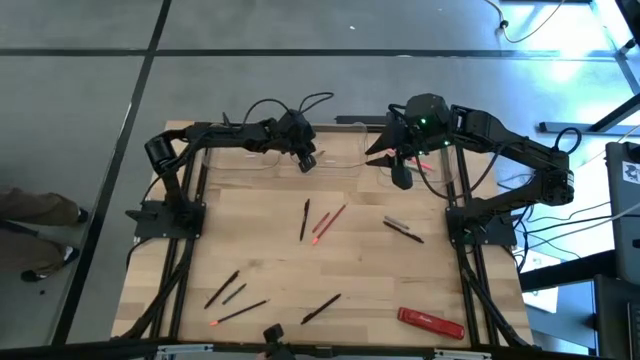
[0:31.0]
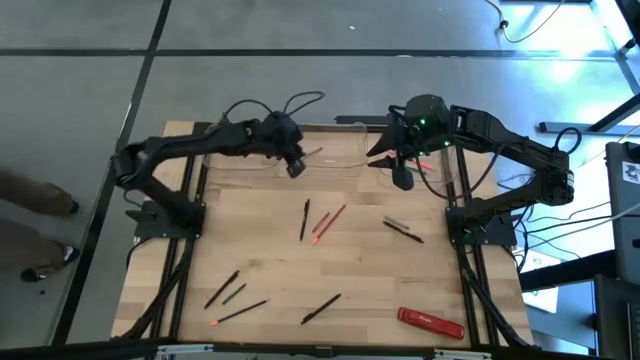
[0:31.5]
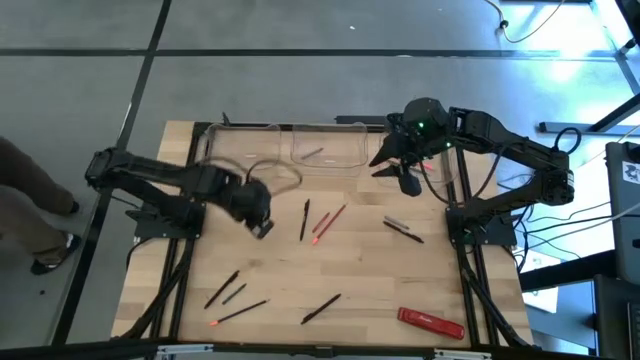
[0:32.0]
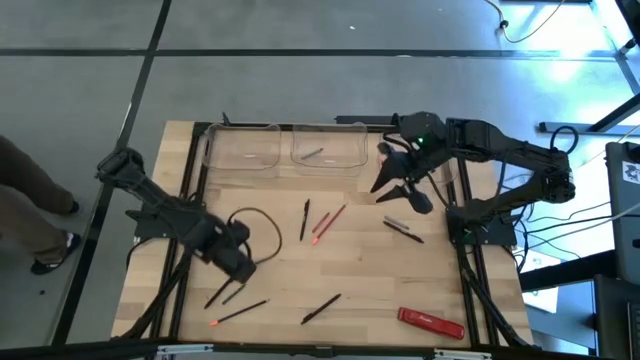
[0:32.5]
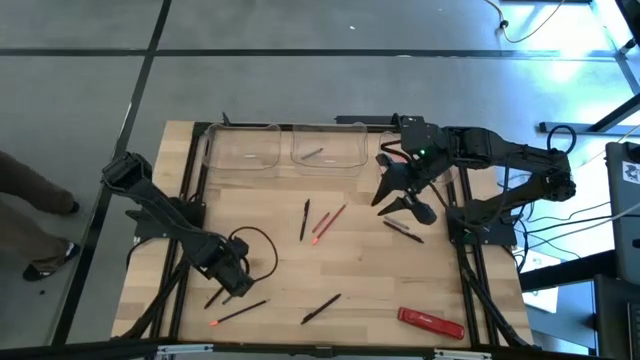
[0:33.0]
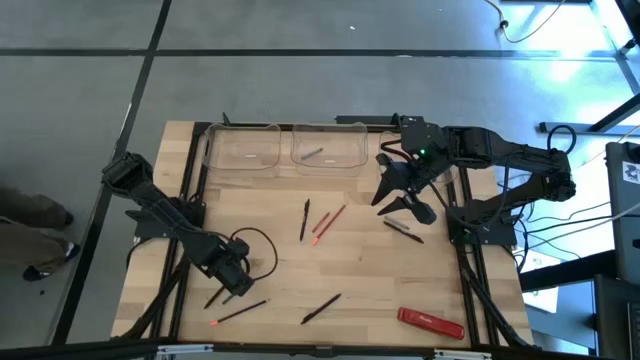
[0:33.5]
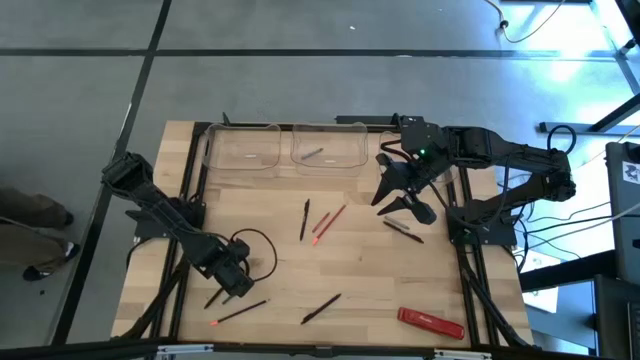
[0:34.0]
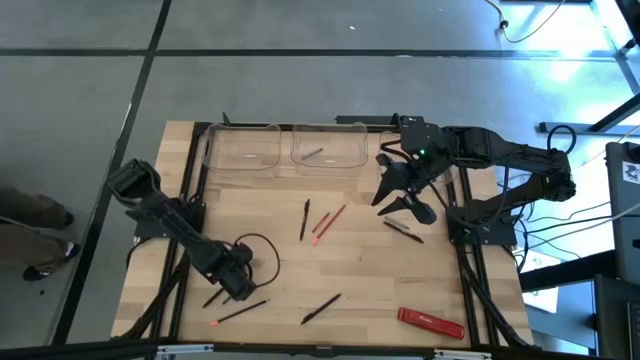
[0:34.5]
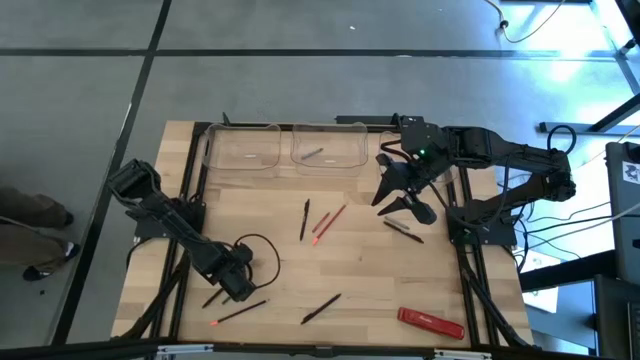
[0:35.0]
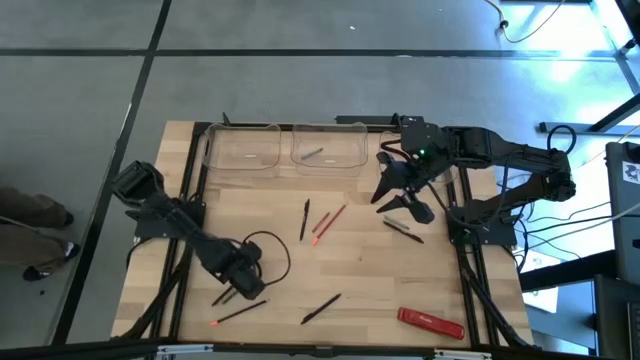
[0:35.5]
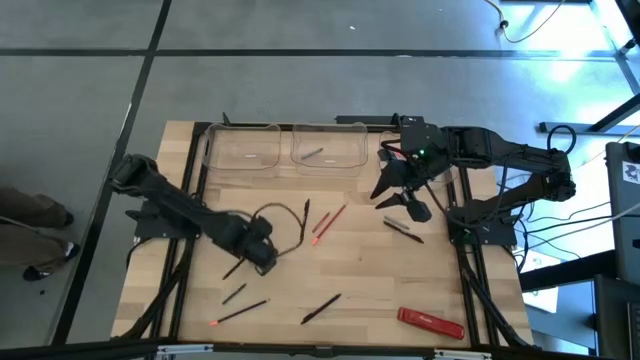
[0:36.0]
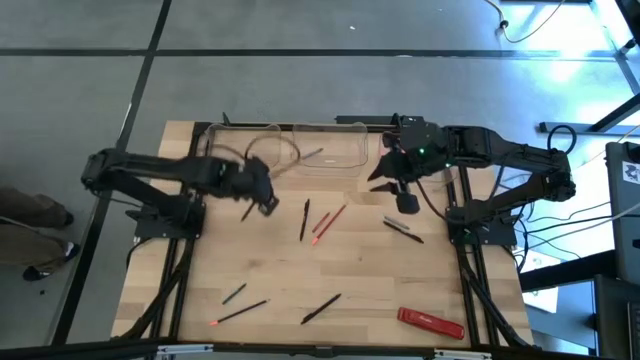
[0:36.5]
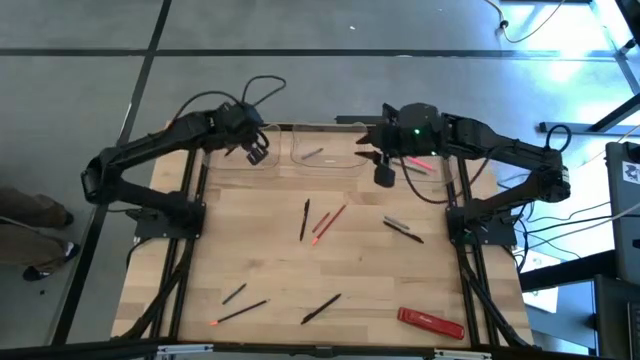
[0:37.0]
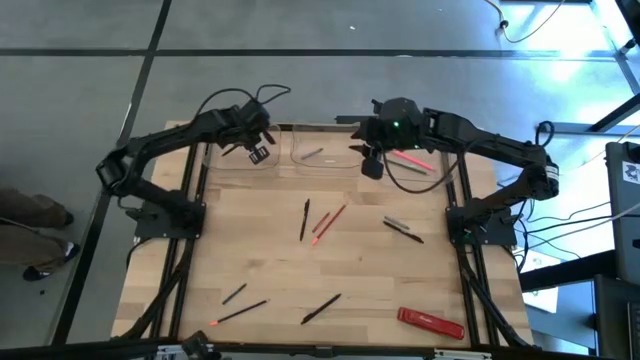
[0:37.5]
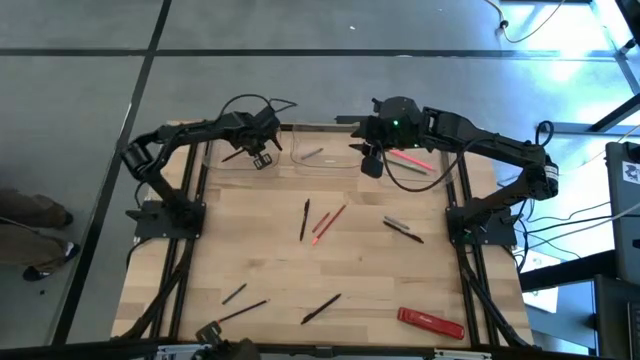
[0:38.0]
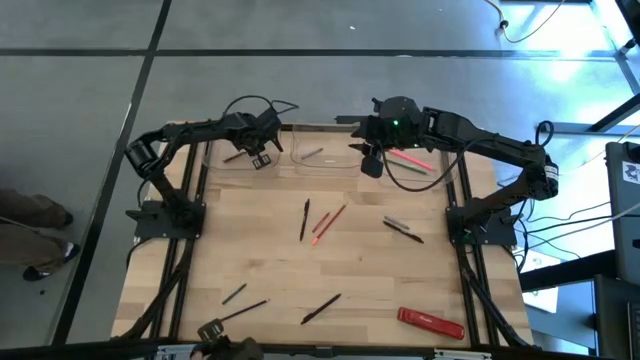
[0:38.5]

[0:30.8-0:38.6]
Task: Sort crayons/erasers/pens/pencils in bins
Put the black pen into the left transparent bin

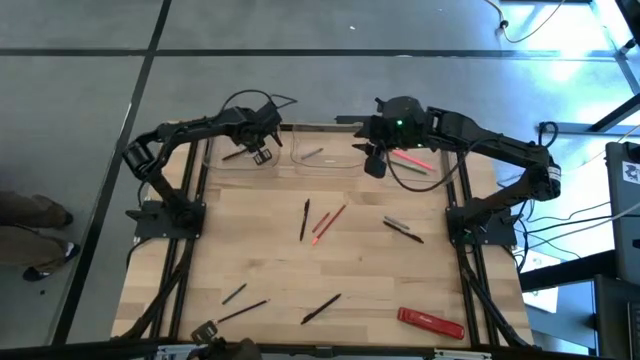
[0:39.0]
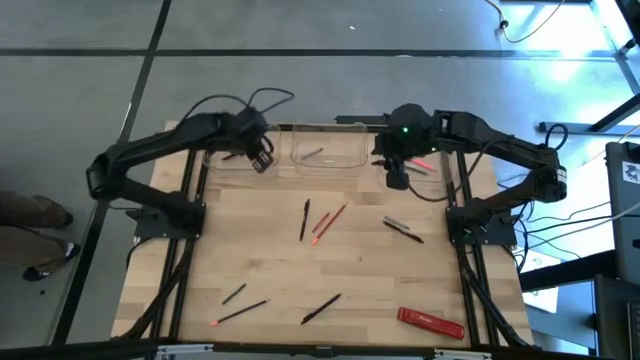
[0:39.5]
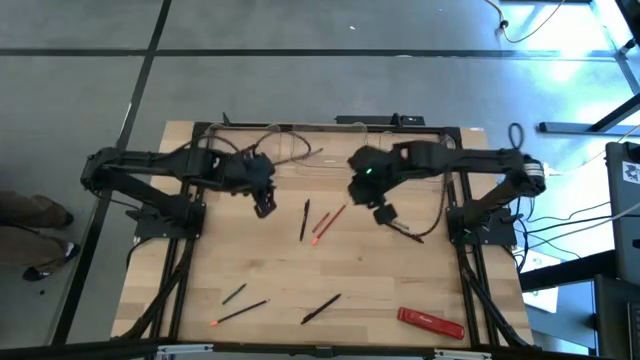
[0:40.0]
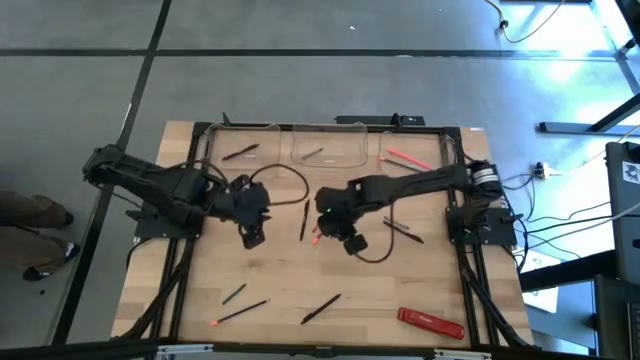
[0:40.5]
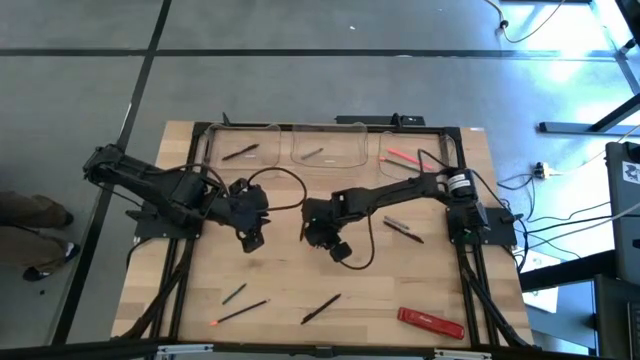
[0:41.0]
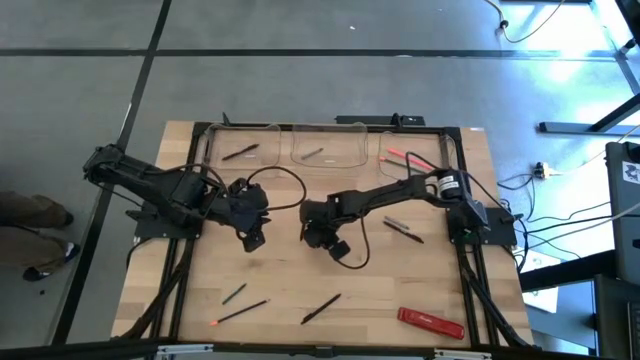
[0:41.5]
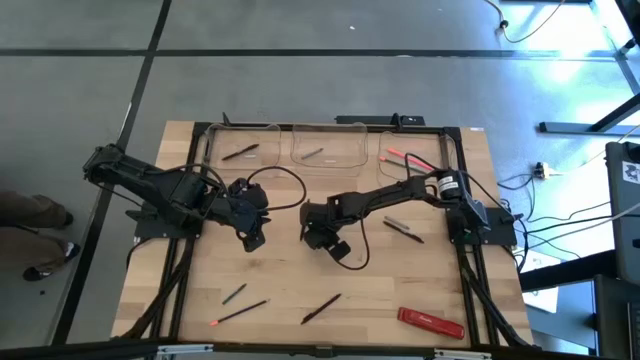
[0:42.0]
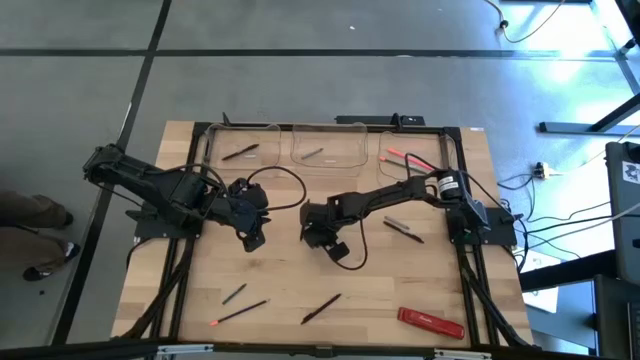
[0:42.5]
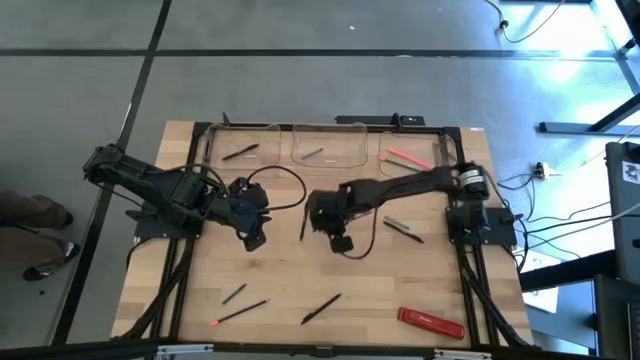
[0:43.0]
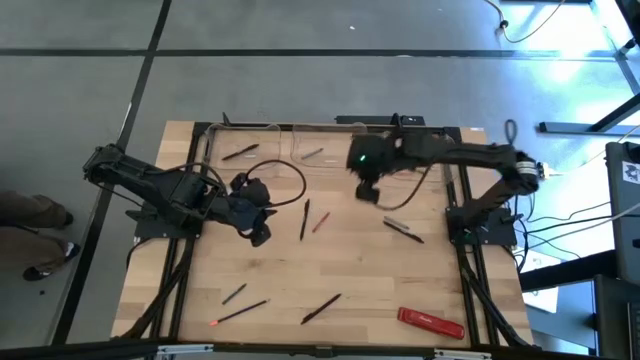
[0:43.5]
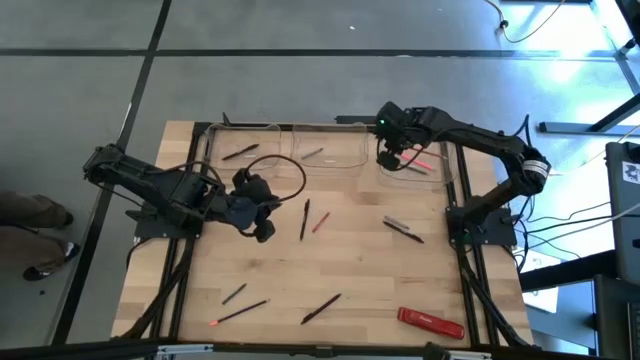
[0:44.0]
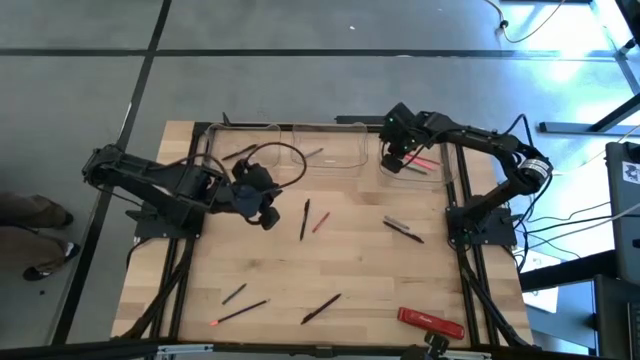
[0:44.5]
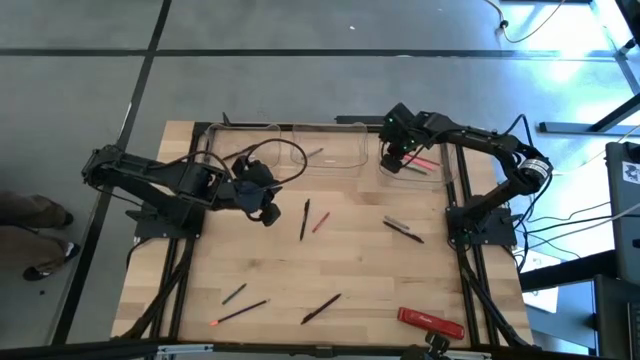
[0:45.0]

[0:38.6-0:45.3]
Put the red pencil into the right transparent bin

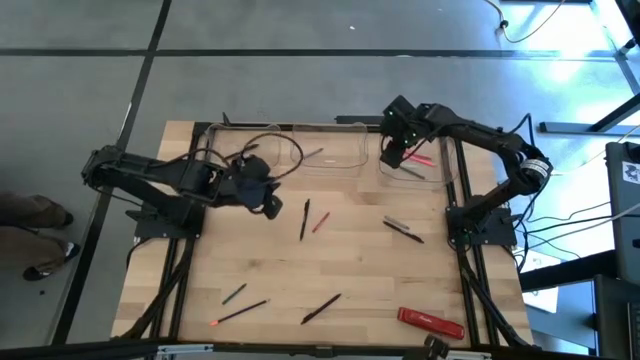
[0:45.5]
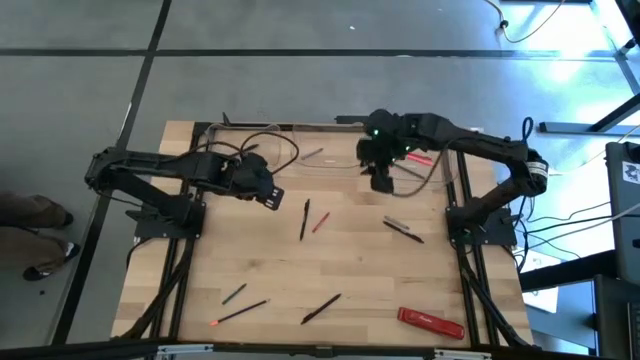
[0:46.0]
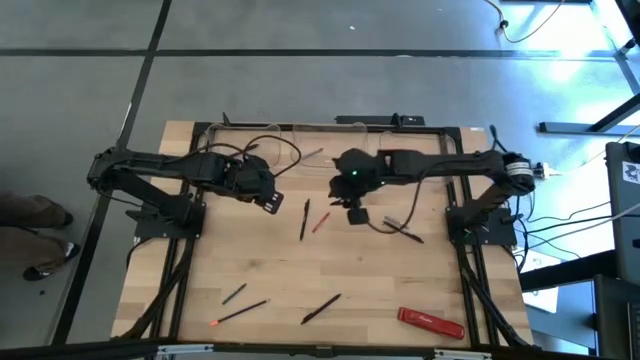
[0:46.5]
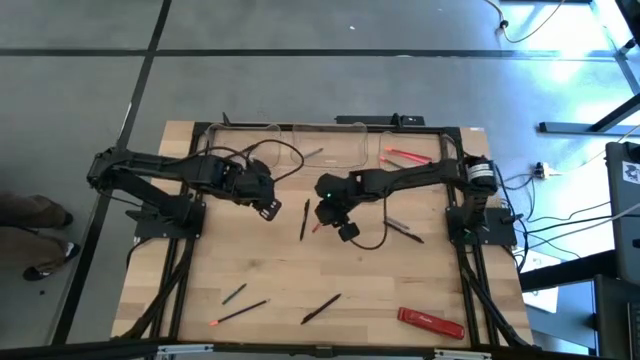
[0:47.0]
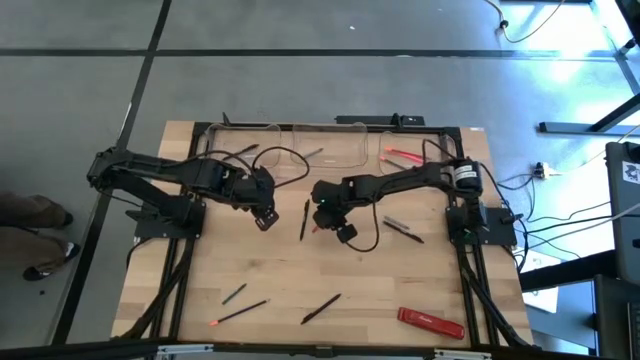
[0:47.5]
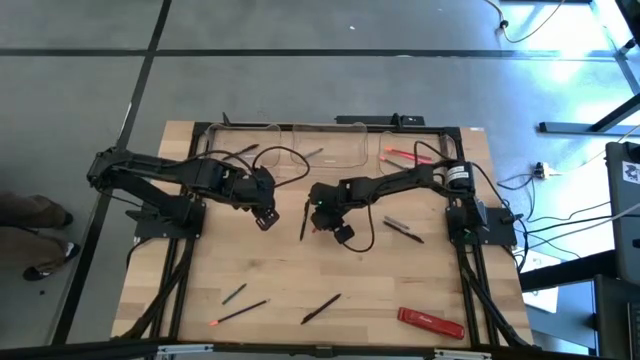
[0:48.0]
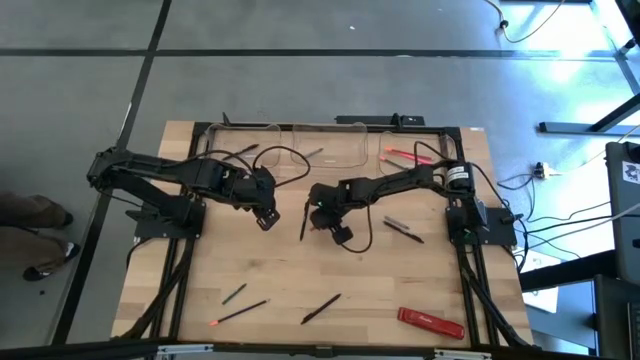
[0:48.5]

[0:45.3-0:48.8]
Put the red crayon into the center transparent bin

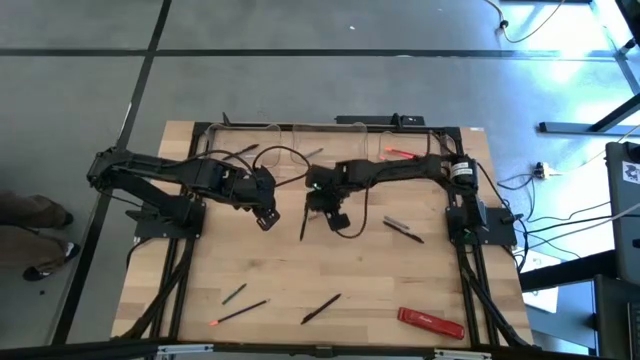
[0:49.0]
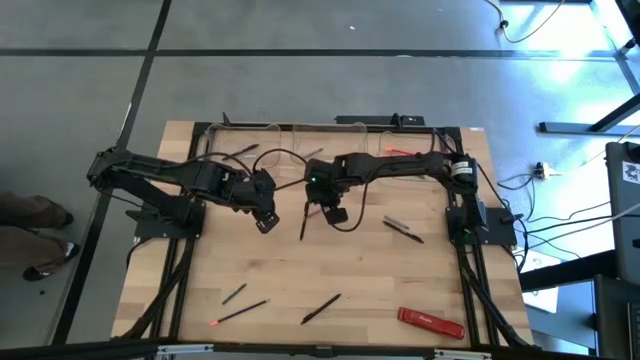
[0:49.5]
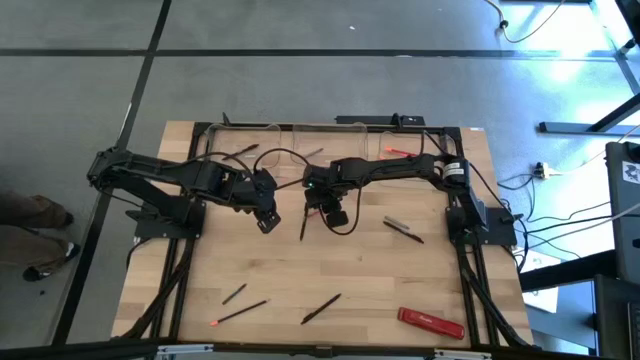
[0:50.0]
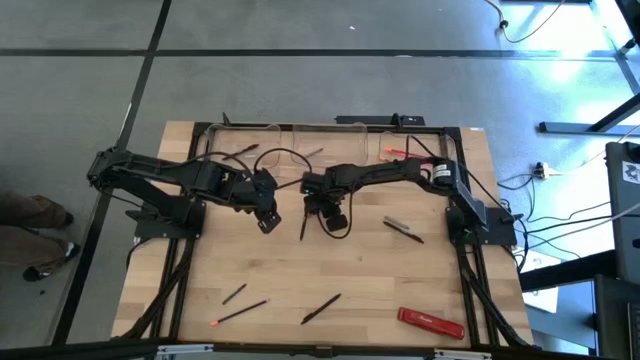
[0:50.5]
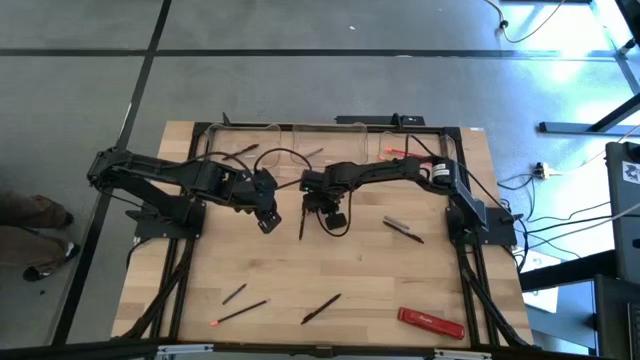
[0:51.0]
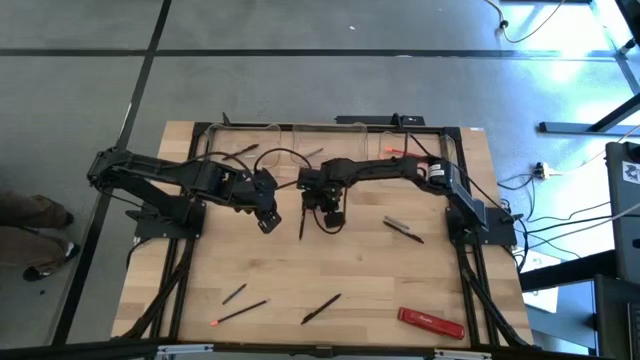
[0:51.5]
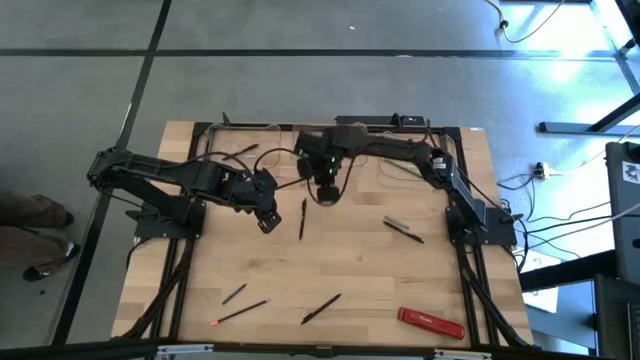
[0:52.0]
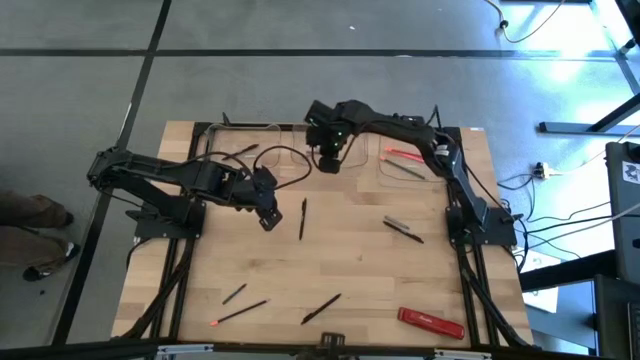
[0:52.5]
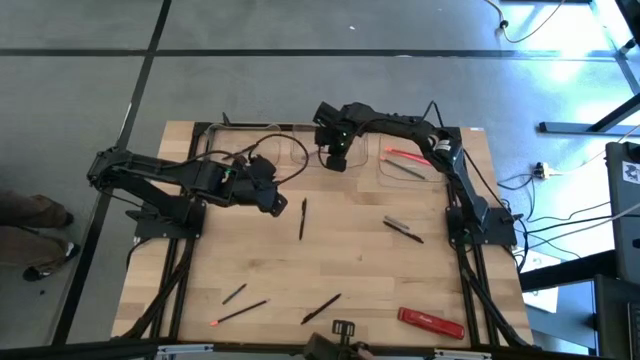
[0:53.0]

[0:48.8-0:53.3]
Put the red crayon into the center transparent bin
